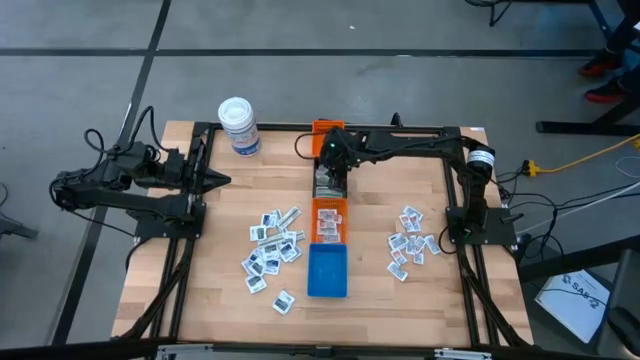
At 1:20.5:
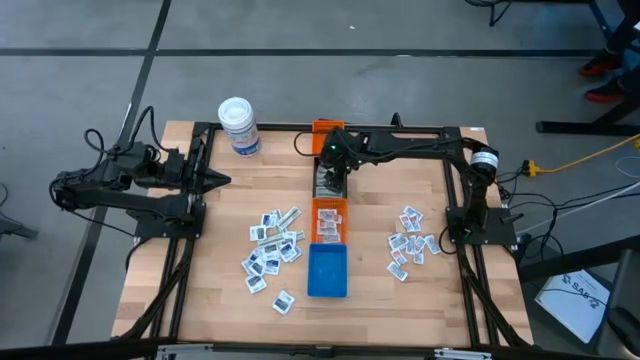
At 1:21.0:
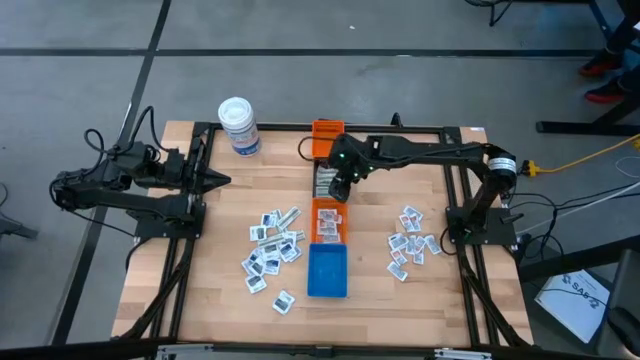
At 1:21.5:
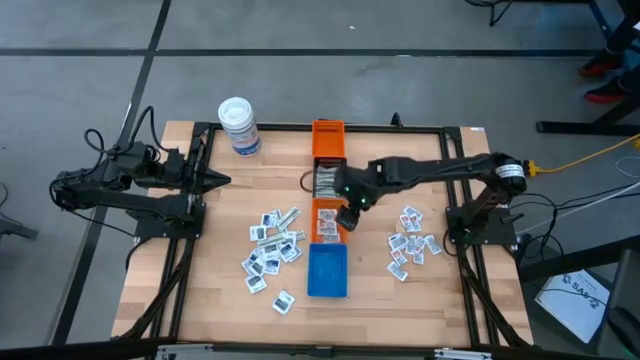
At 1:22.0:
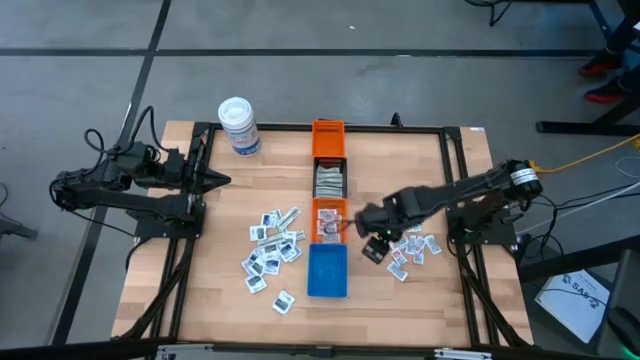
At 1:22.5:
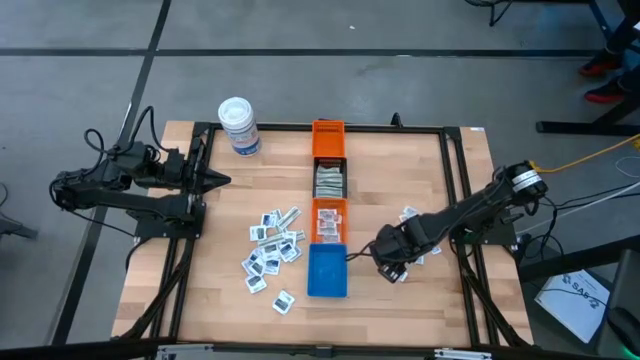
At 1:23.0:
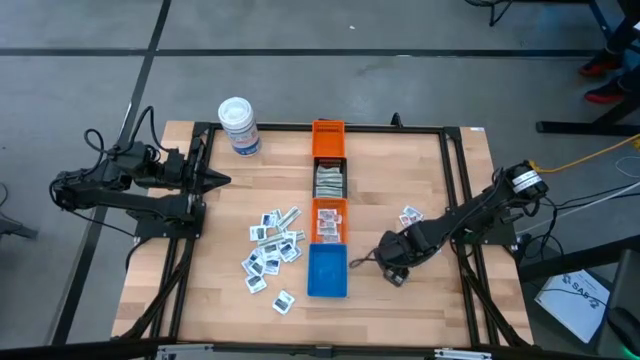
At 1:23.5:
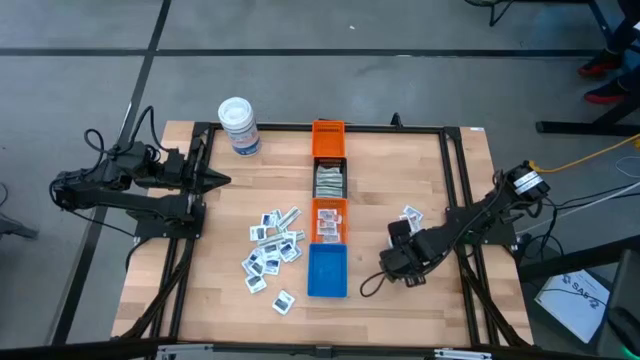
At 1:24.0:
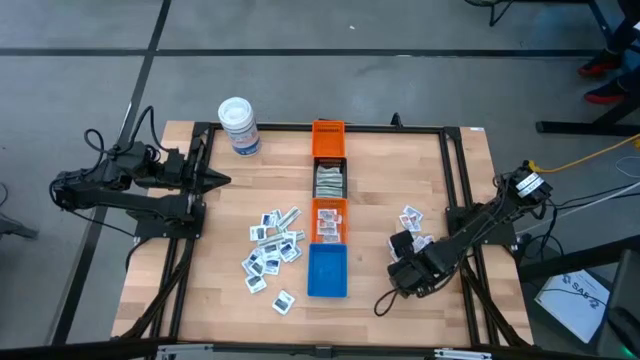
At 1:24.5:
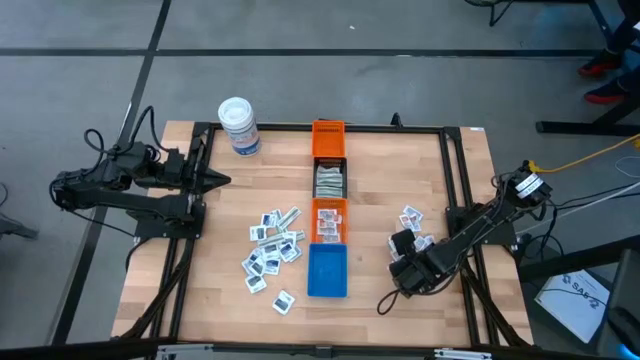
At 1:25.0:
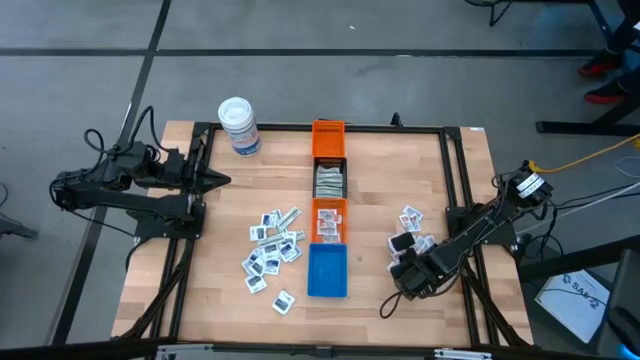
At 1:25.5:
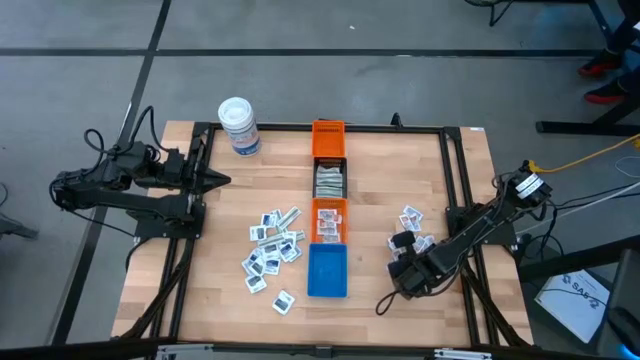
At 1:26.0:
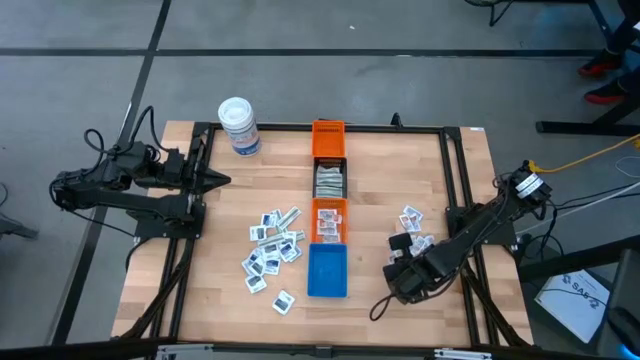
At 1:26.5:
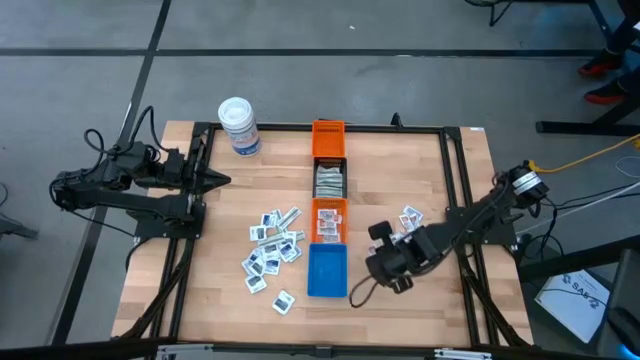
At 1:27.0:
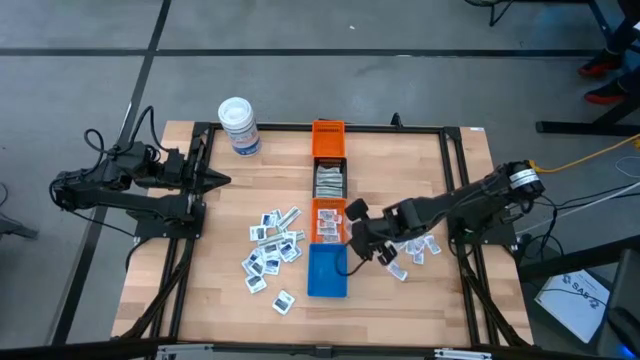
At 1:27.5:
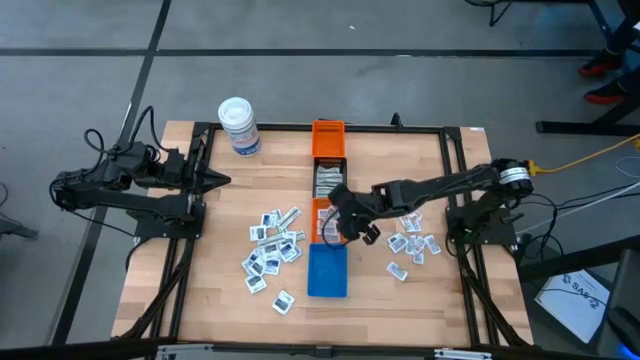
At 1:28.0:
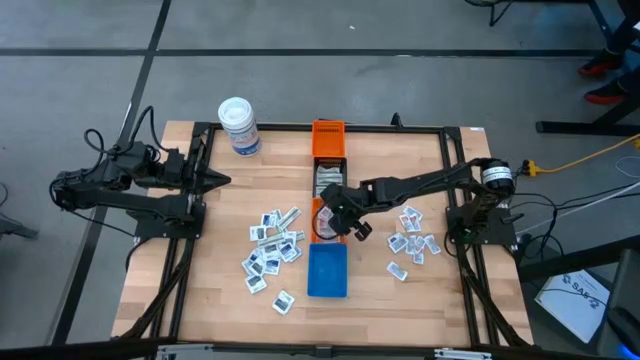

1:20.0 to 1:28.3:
Task: Pick & Place First Aid Supplies
Put the orange ointment pack into the bottom orange bin

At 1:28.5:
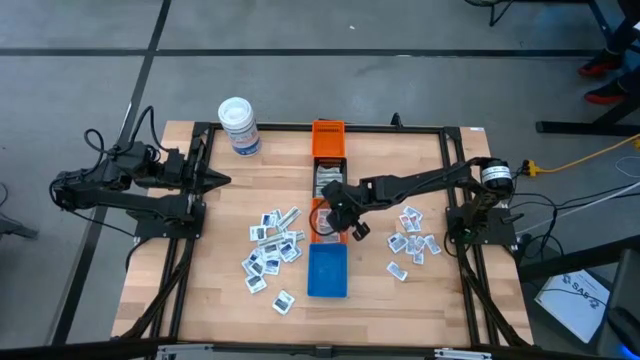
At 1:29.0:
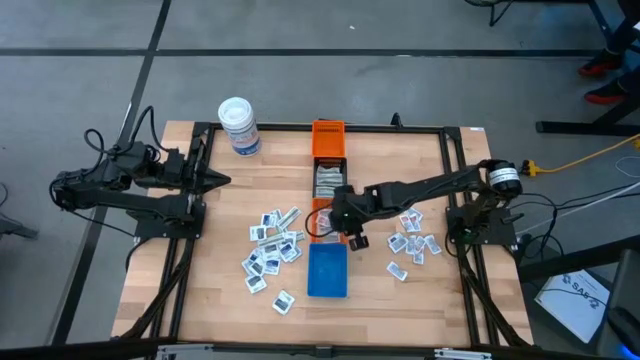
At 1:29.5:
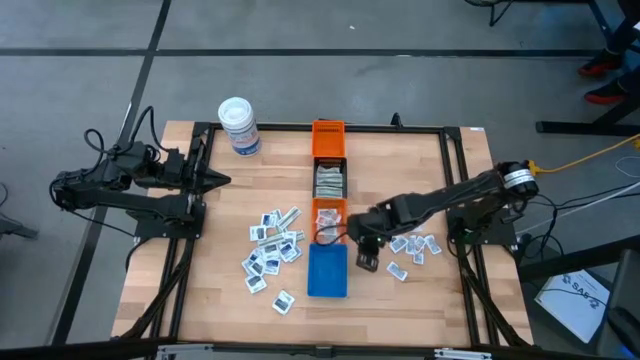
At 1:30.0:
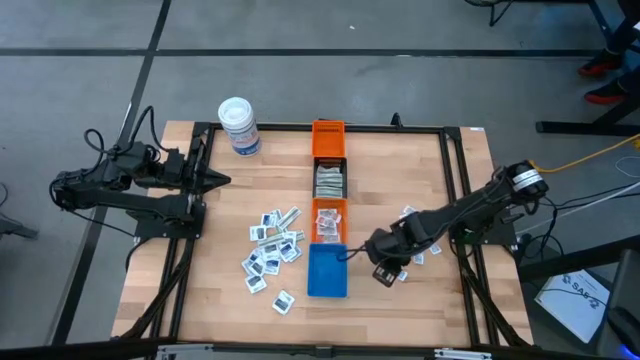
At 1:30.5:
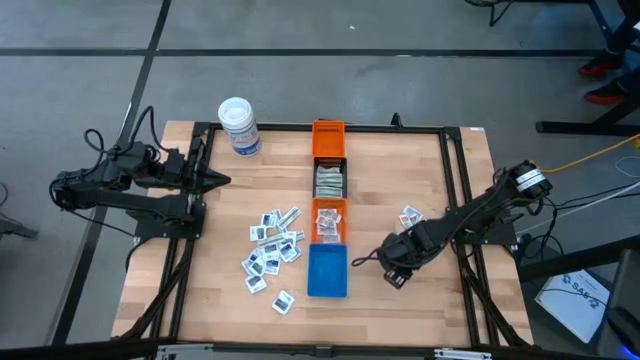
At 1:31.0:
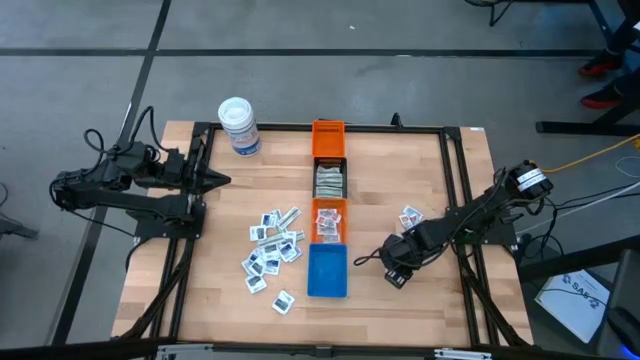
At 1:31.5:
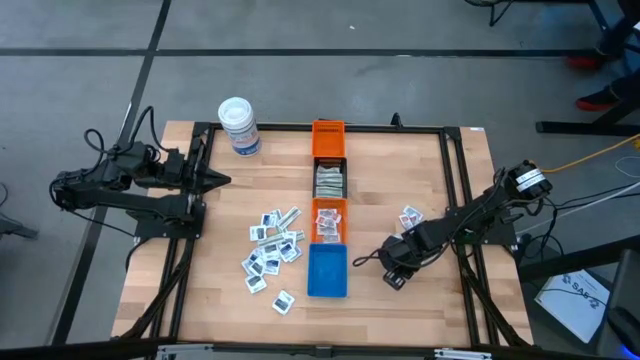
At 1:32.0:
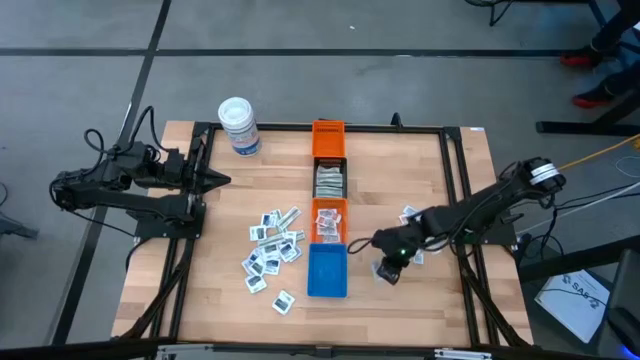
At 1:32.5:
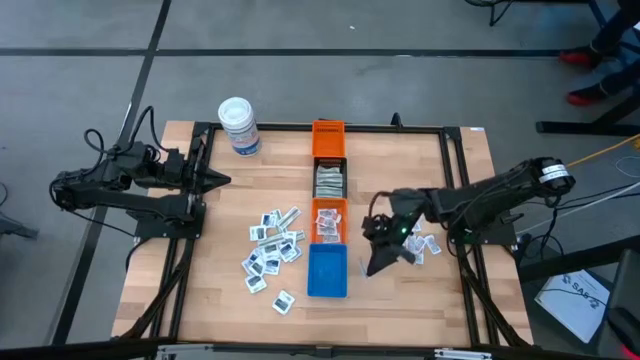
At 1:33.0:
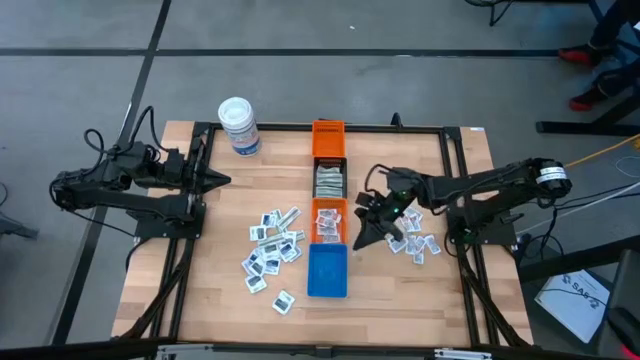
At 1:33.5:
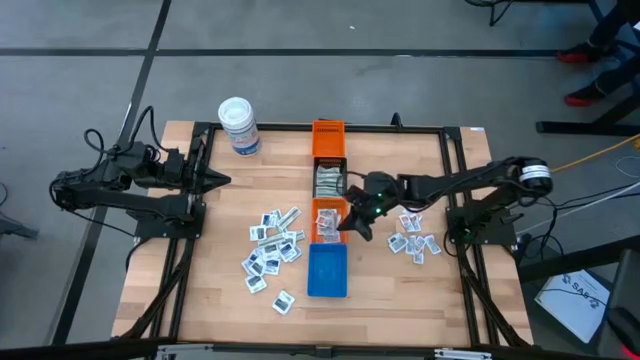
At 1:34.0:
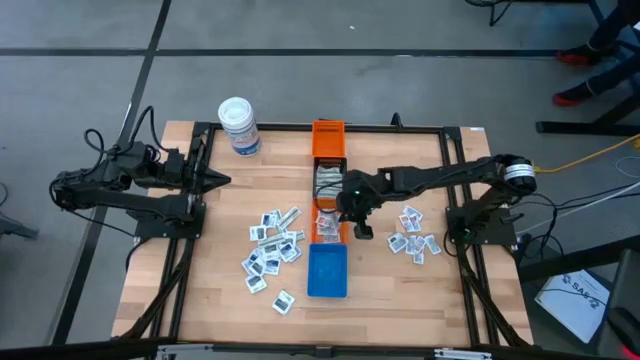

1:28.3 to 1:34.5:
Put the orange ointment pack into the bottom orange bin

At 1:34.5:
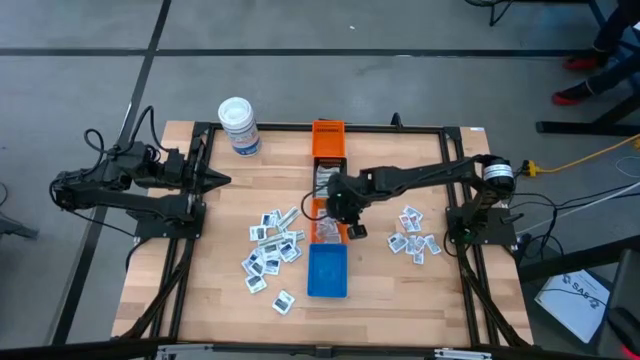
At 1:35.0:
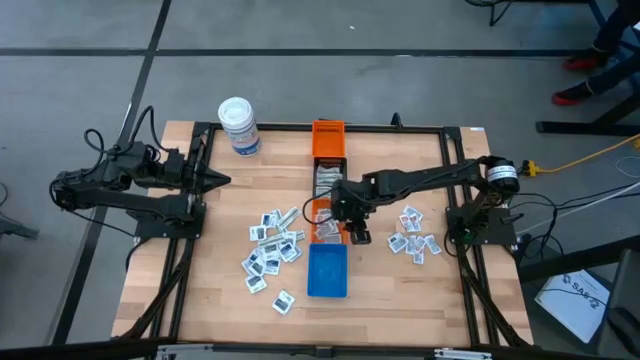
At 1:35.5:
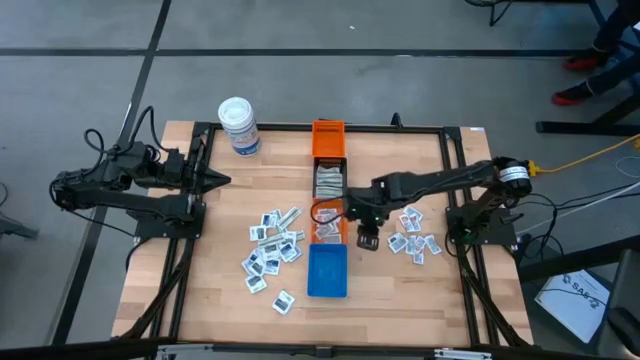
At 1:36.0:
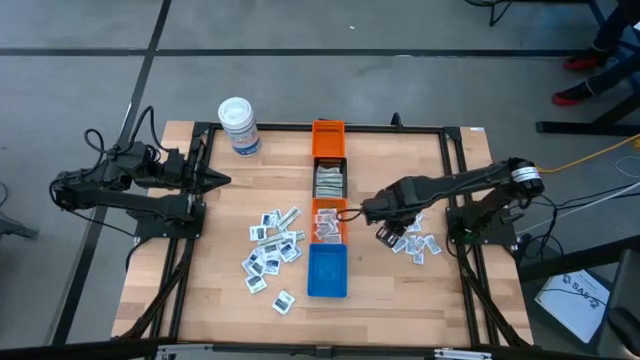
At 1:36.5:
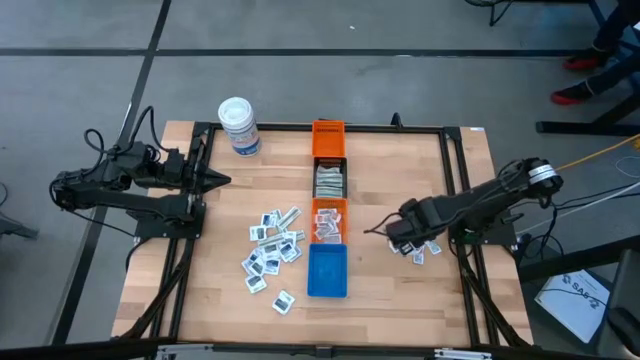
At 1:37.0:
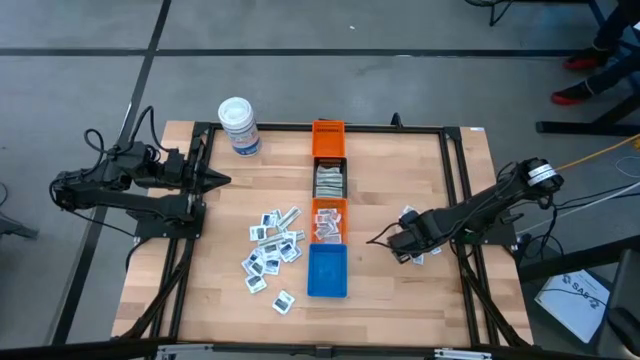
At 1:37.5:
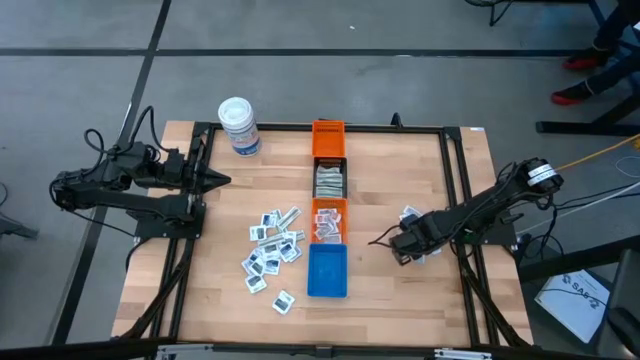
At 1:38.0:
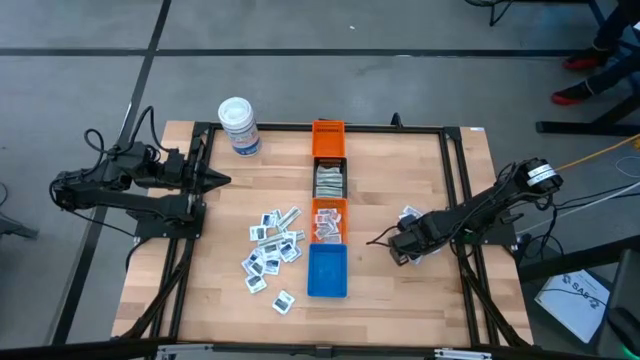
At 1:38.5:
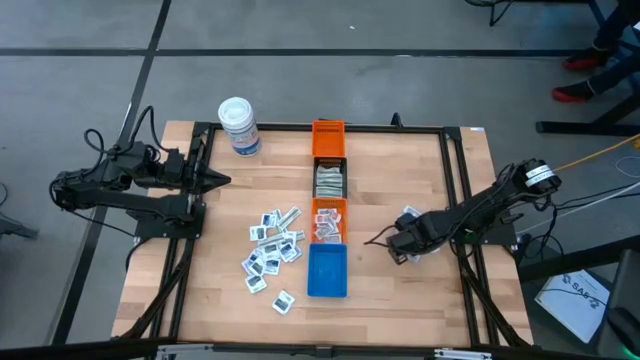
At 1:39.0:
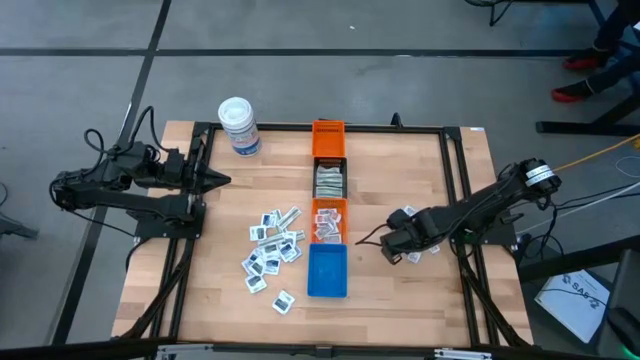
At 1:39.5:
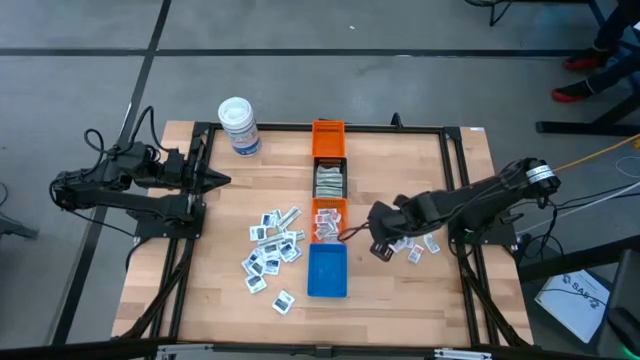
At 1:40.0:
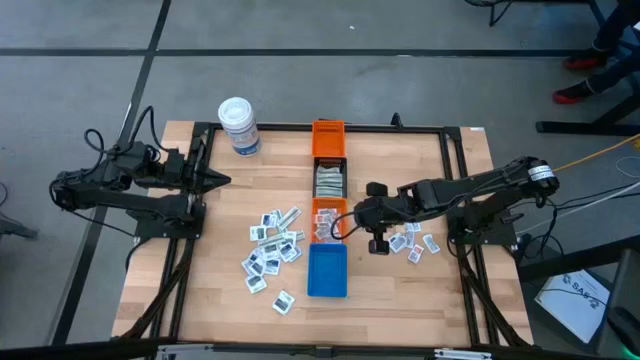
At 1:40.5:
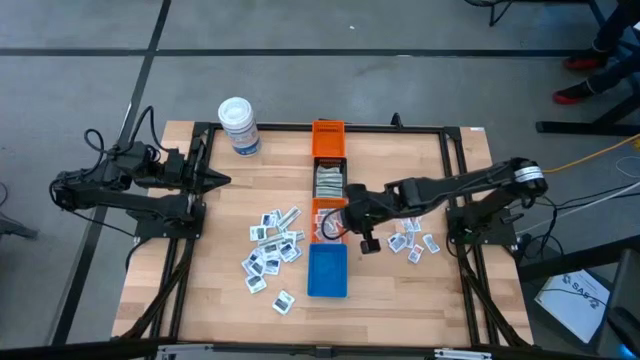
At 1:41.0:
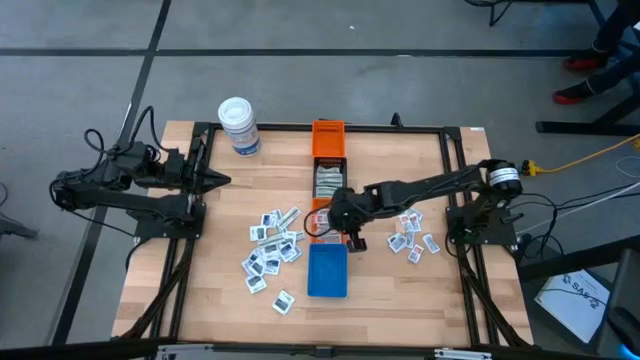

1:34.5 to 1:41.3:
Put the orange ointment pack into the bottom orange bin
